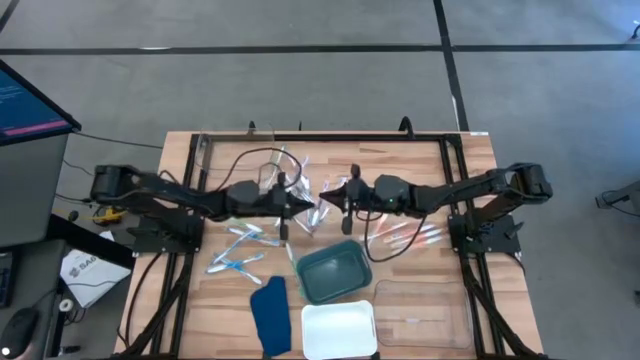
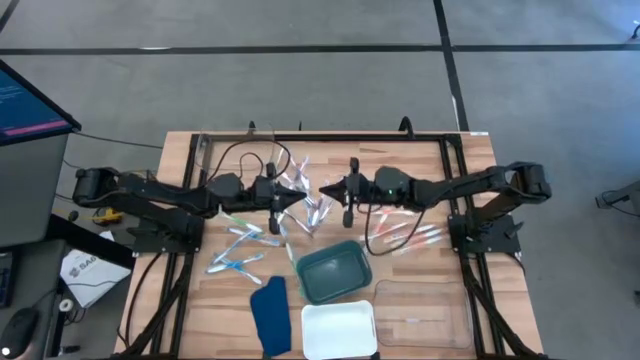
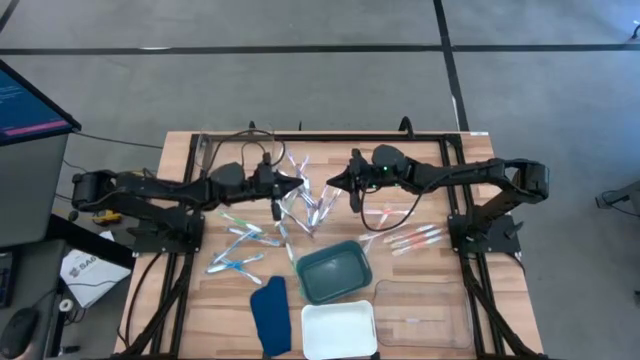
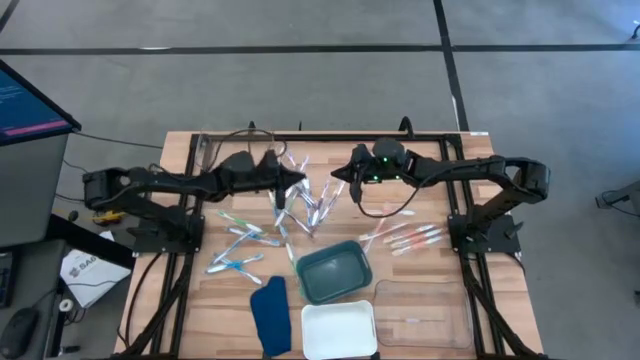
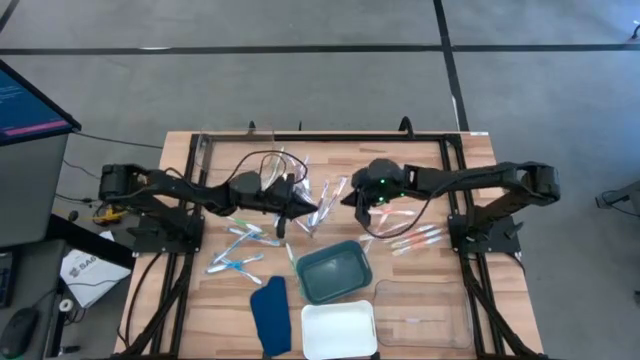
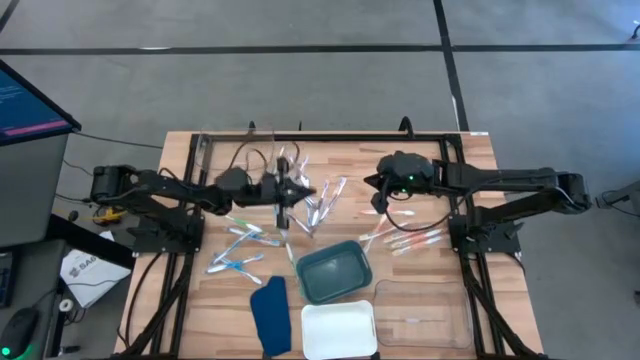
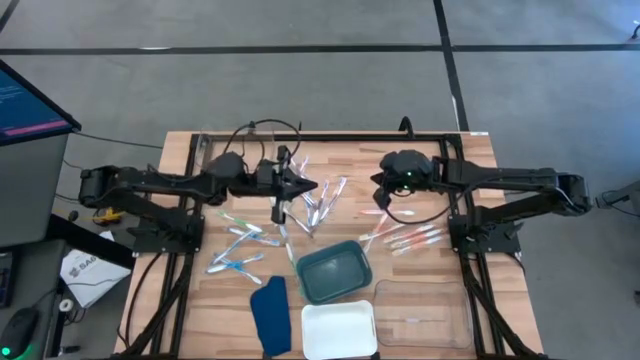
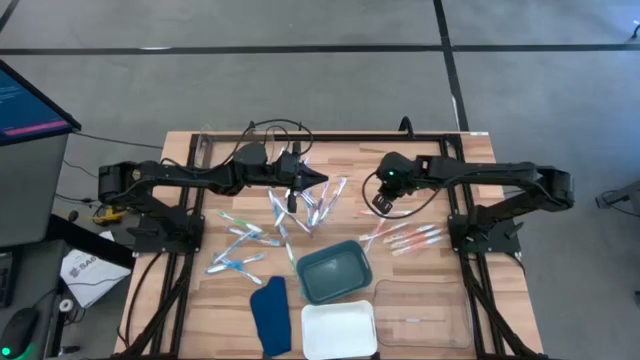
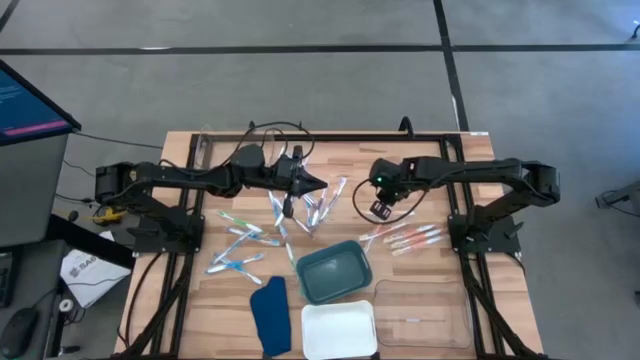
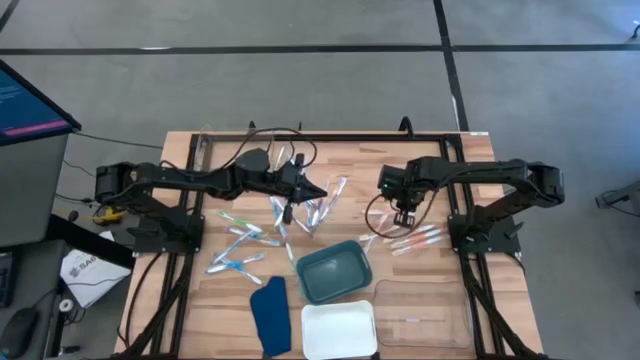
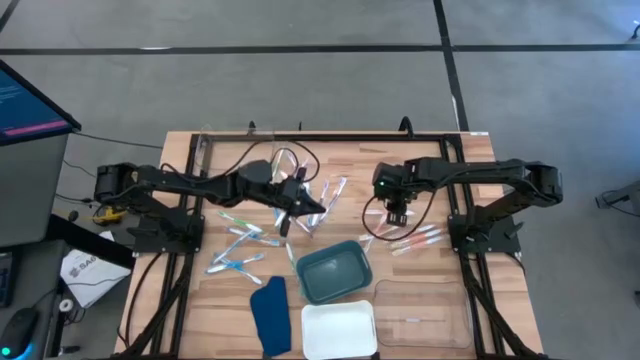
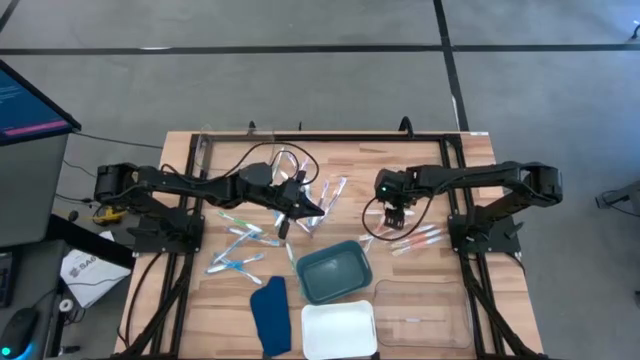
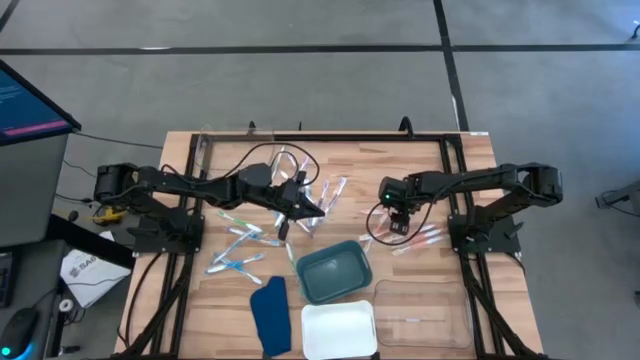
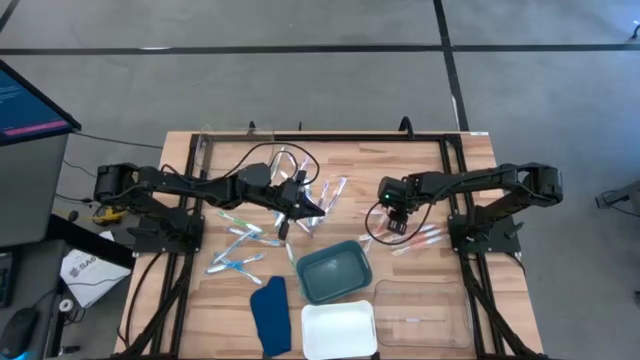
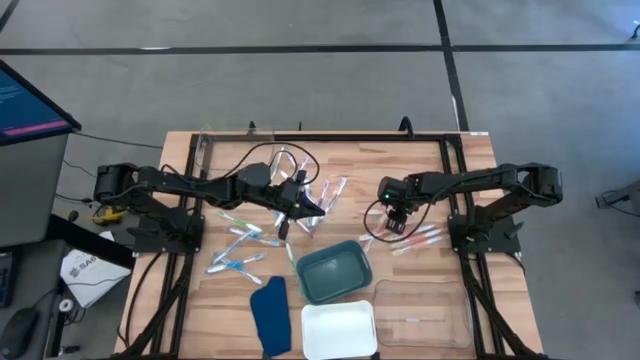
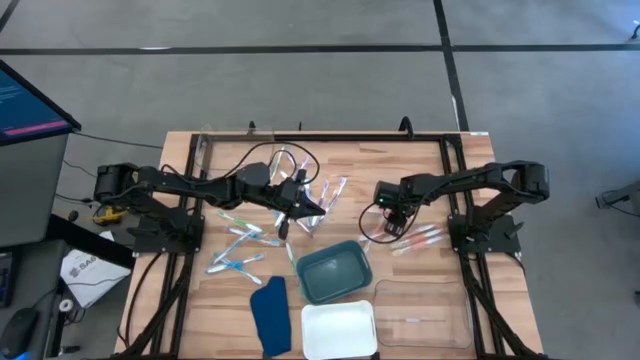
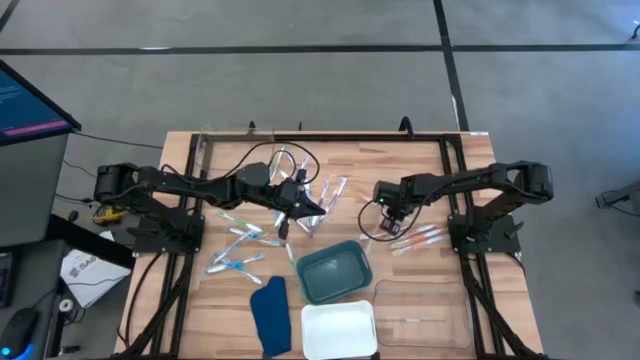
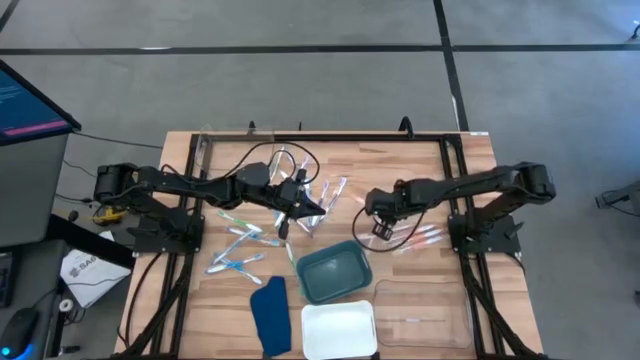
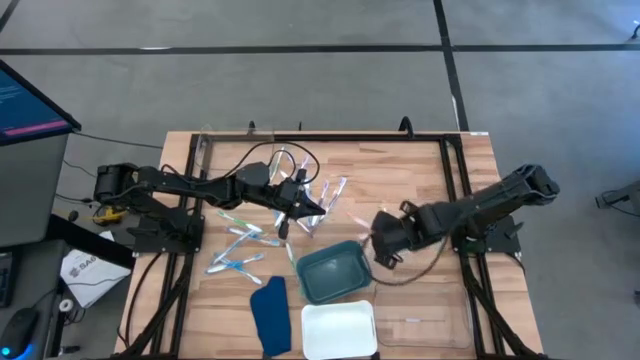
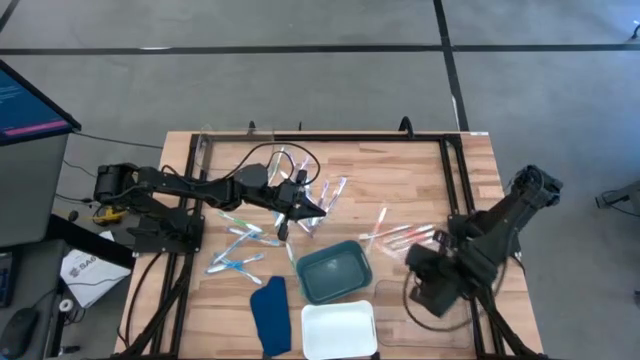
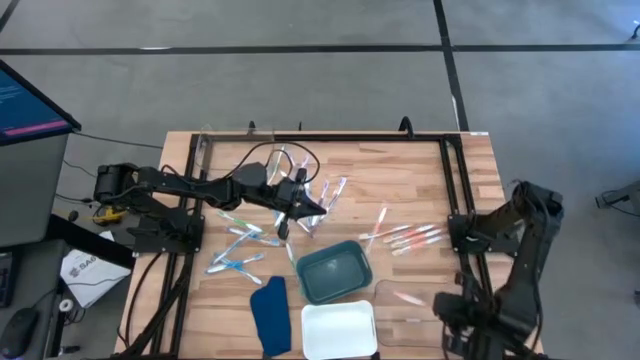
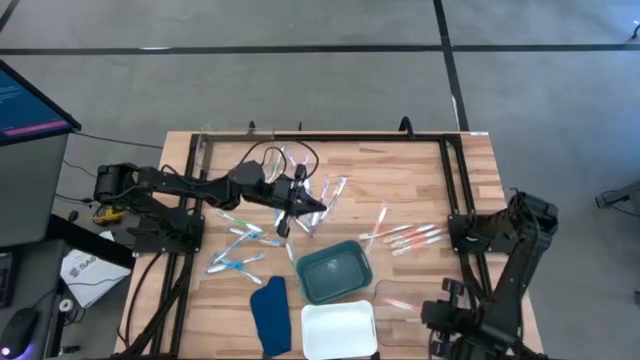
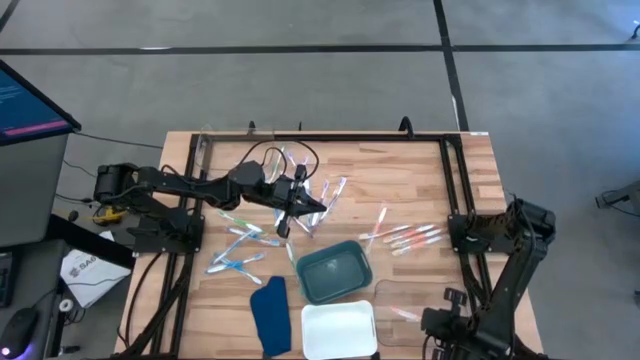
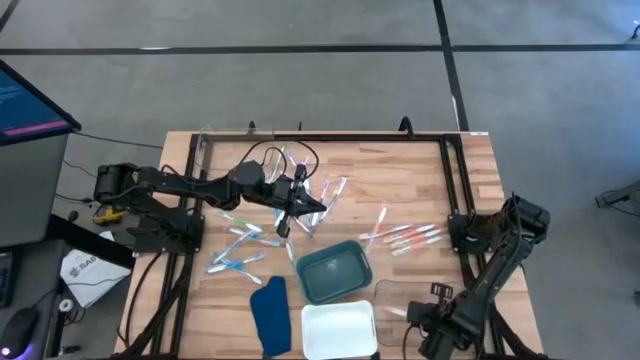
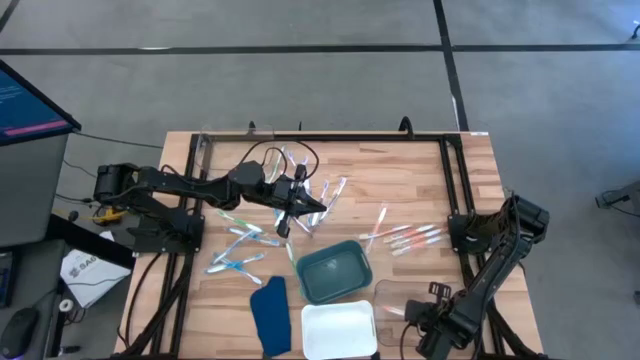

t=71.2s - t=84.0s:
Task: Pick & Place Toothbrushes
Put the orange toothbrush into the bottom transparent bin

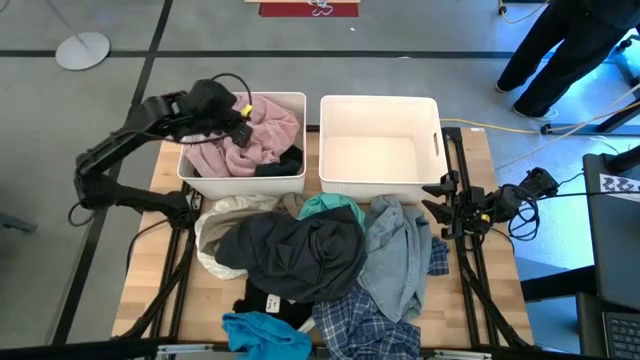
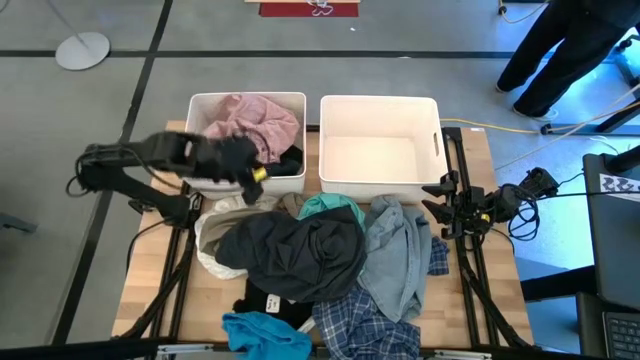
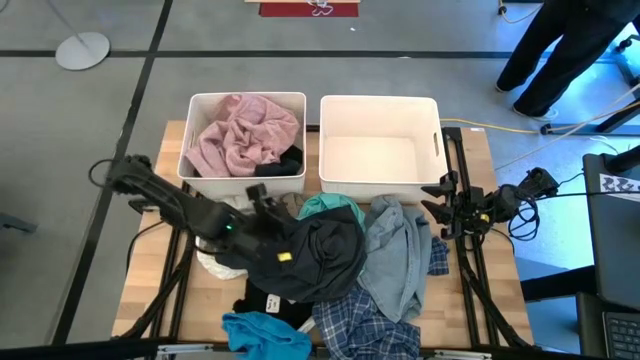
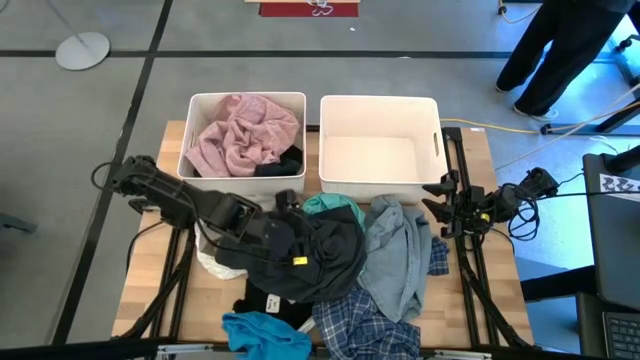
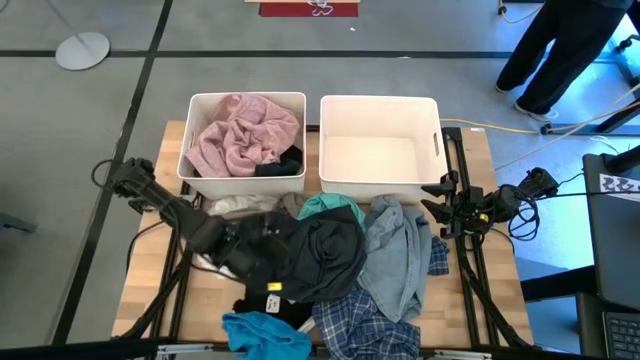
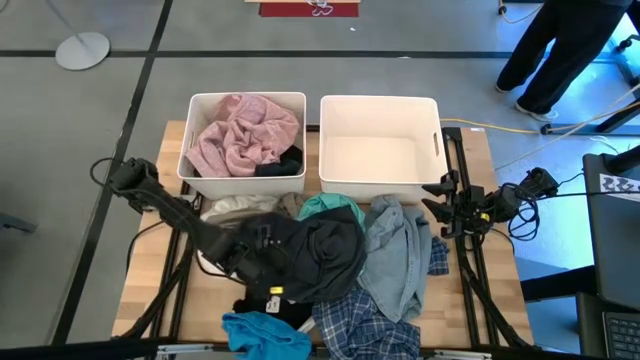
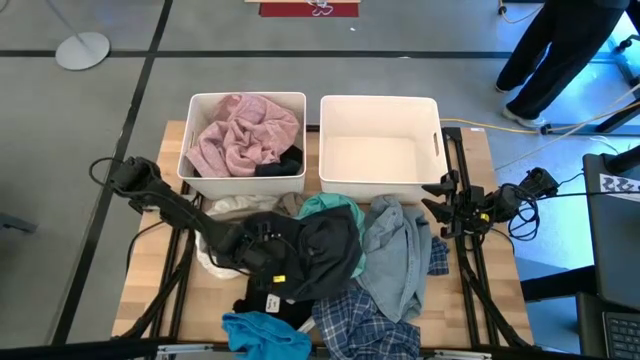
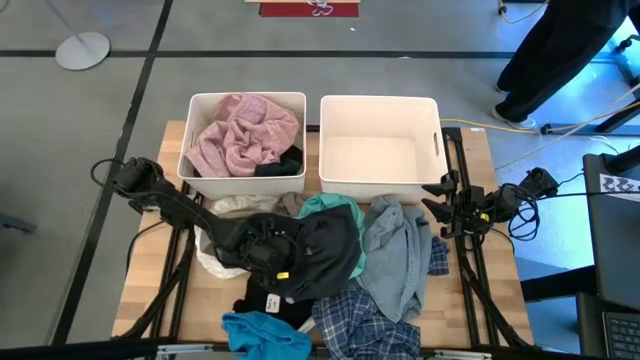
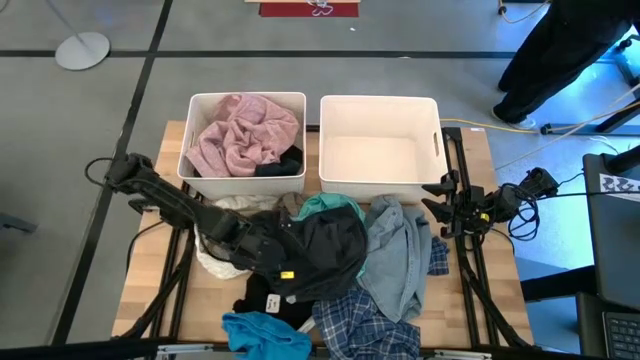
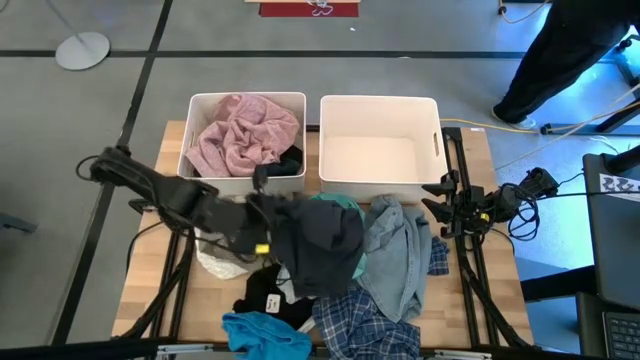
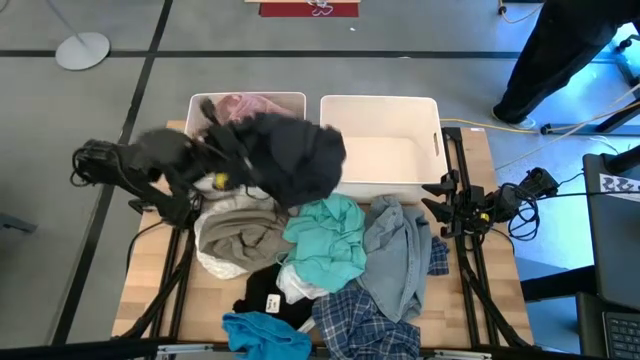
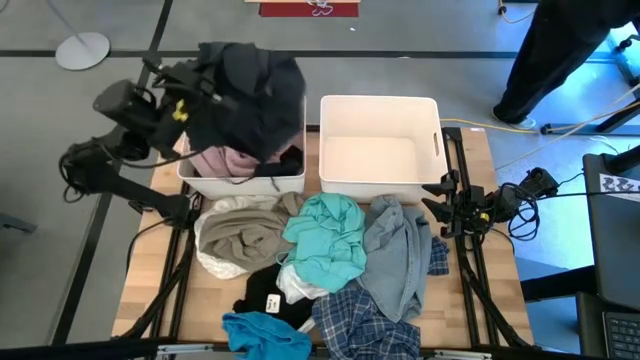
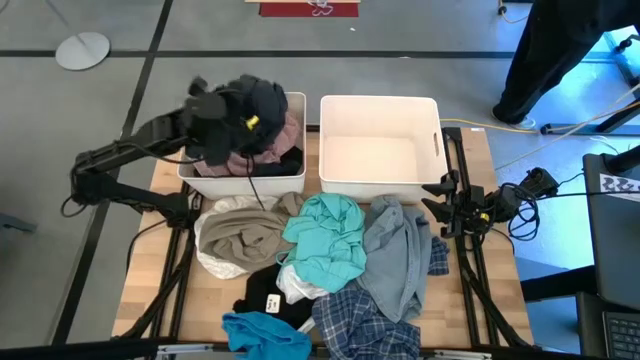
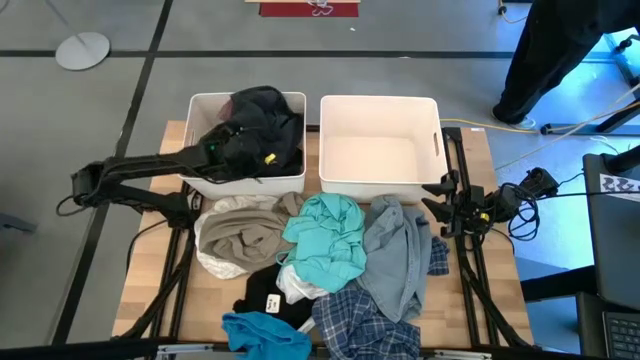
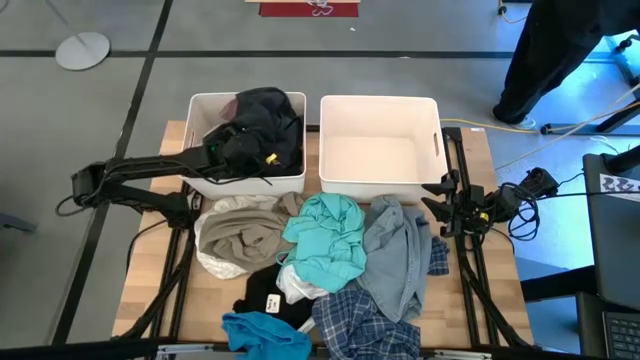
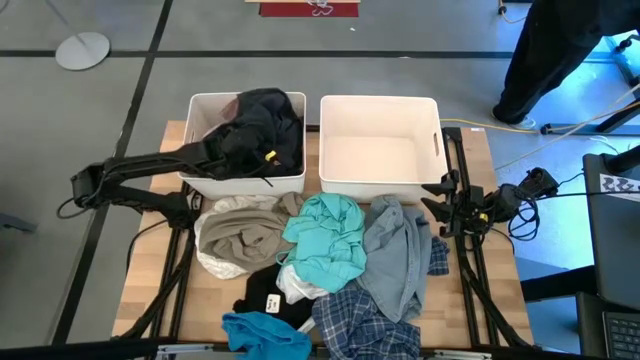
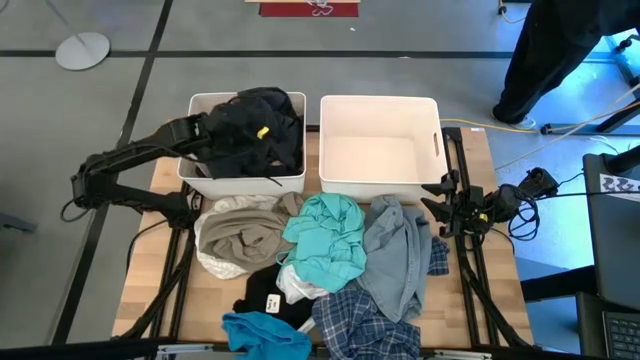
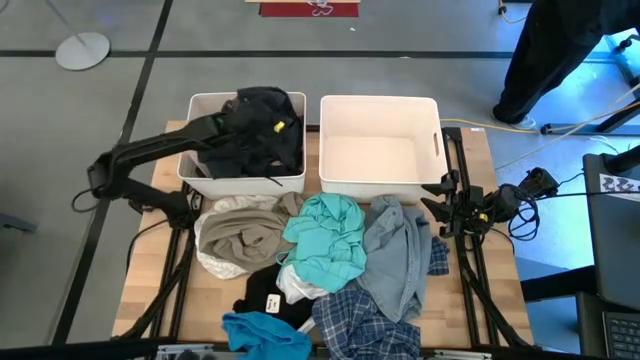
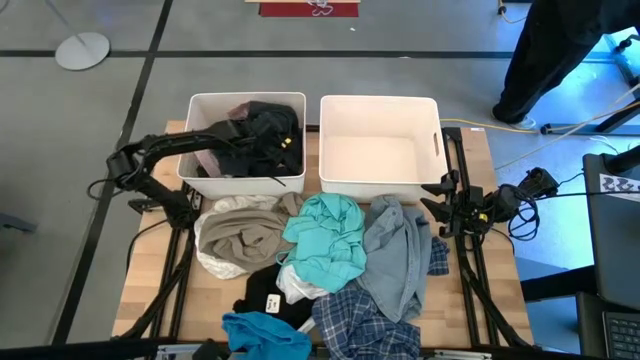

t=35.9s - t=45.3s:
Task: Sort clothes
Put the gray shorts into the left white bin
